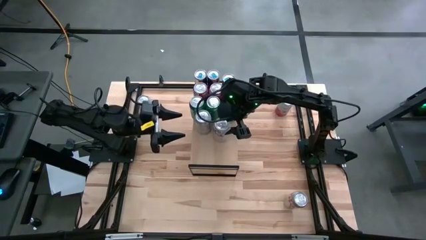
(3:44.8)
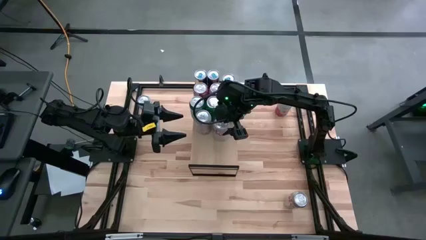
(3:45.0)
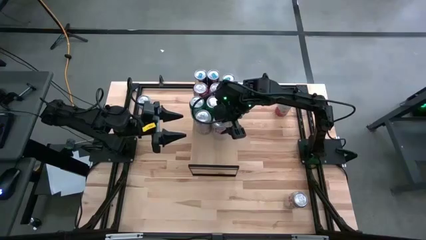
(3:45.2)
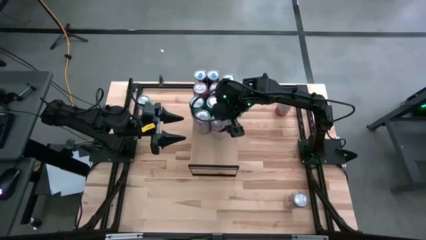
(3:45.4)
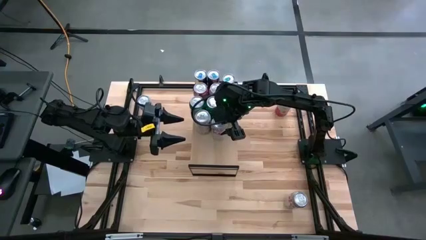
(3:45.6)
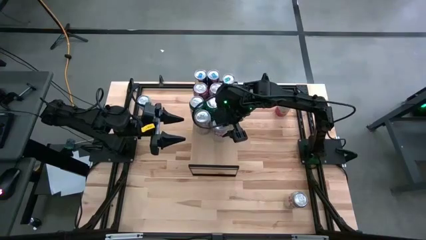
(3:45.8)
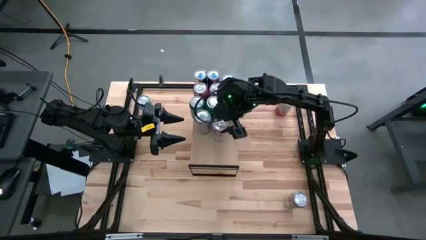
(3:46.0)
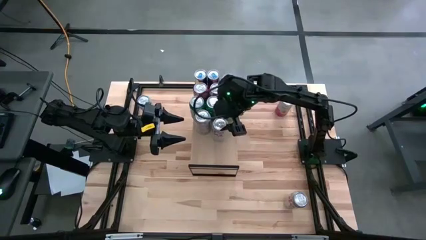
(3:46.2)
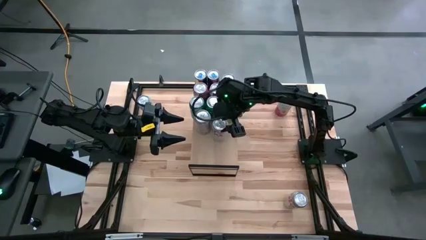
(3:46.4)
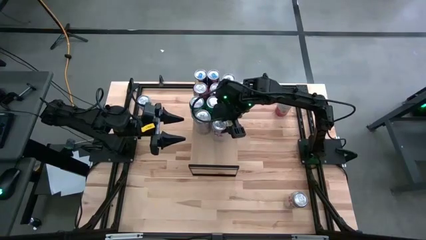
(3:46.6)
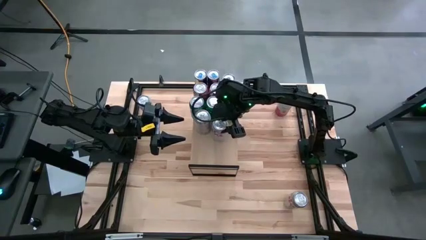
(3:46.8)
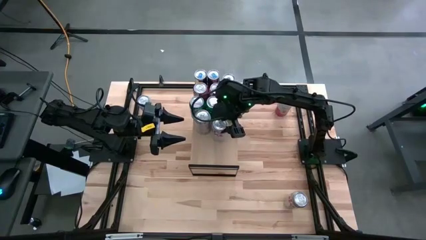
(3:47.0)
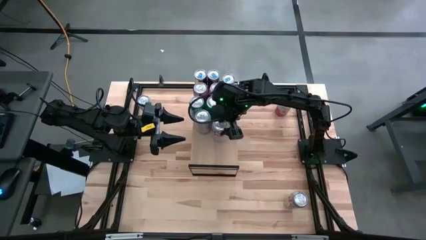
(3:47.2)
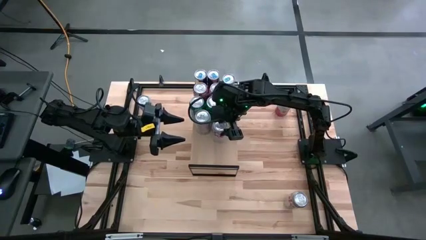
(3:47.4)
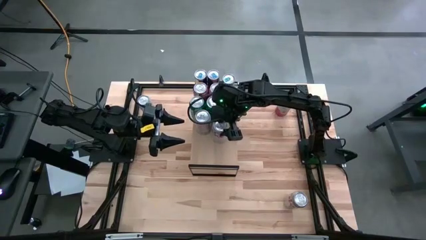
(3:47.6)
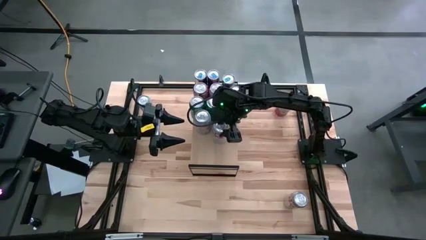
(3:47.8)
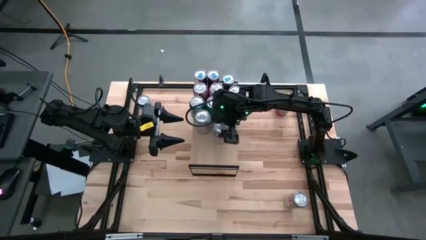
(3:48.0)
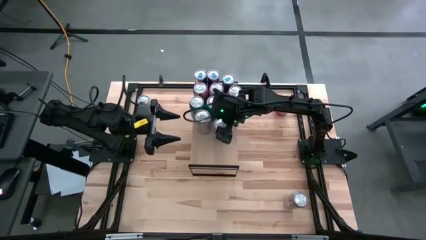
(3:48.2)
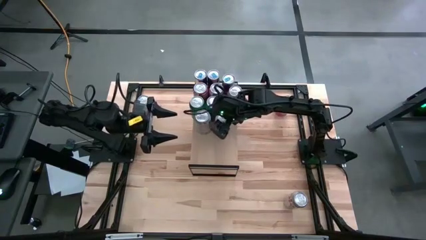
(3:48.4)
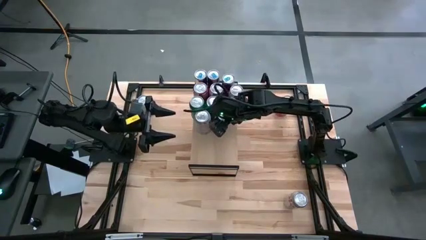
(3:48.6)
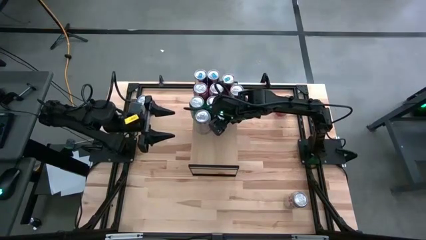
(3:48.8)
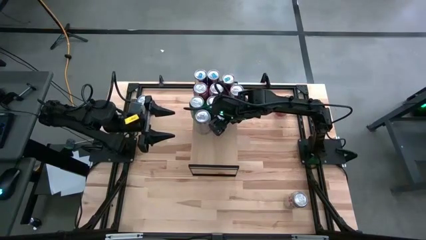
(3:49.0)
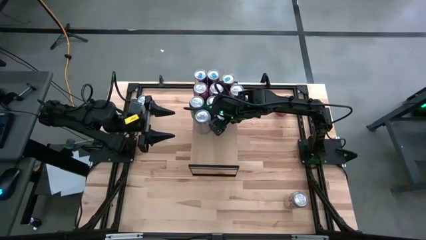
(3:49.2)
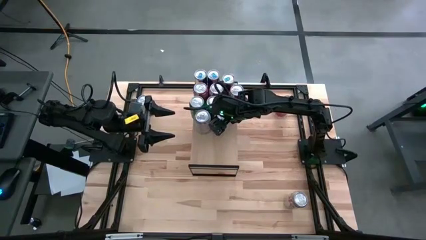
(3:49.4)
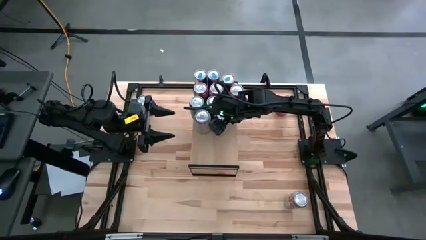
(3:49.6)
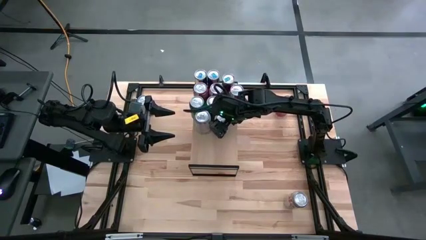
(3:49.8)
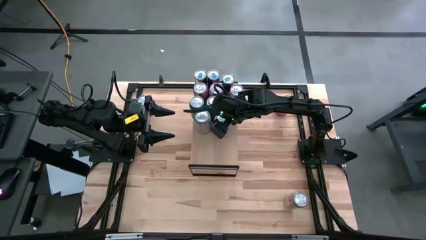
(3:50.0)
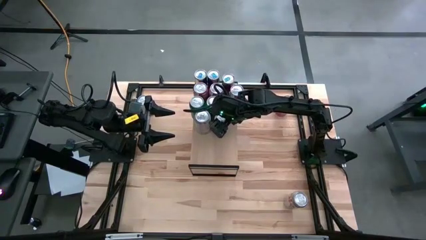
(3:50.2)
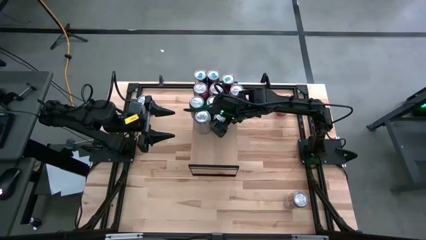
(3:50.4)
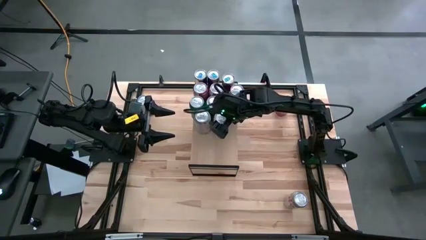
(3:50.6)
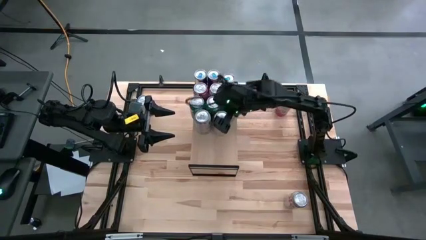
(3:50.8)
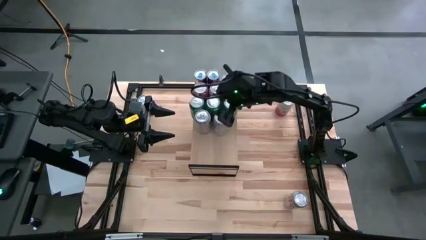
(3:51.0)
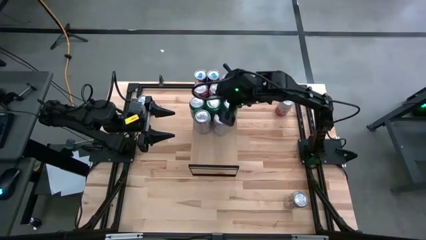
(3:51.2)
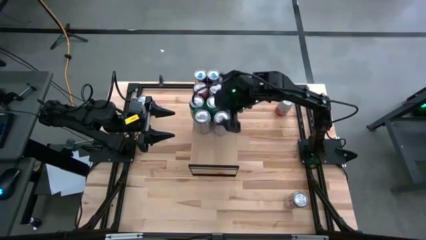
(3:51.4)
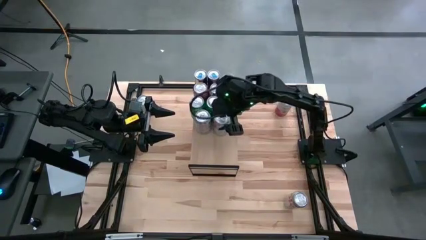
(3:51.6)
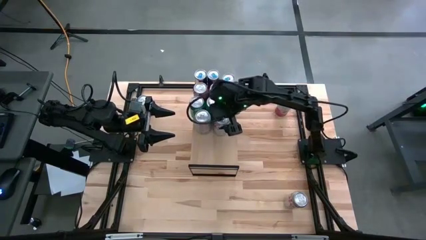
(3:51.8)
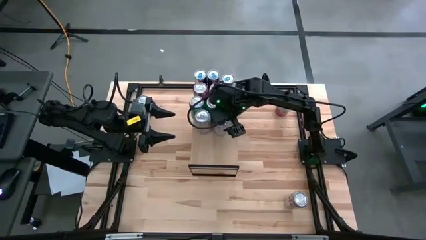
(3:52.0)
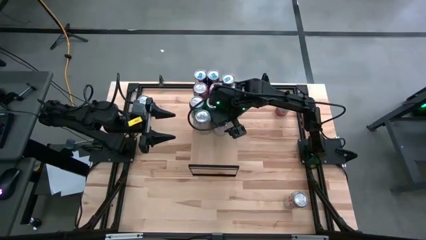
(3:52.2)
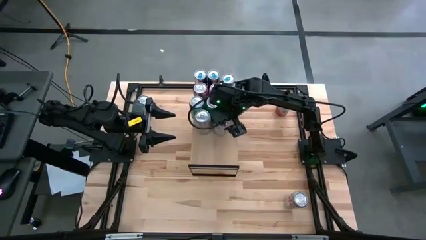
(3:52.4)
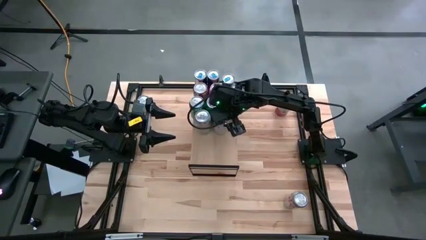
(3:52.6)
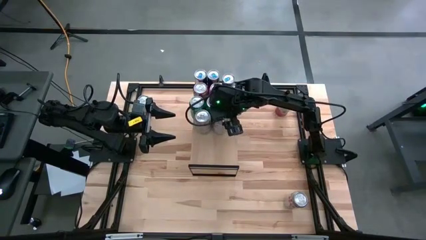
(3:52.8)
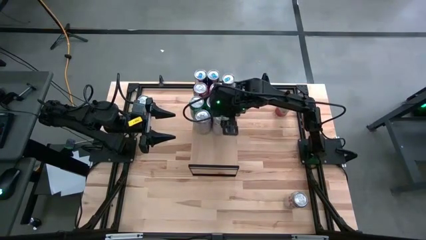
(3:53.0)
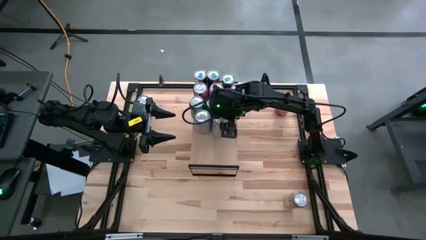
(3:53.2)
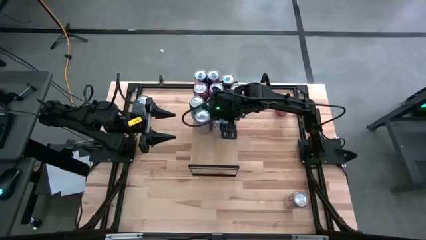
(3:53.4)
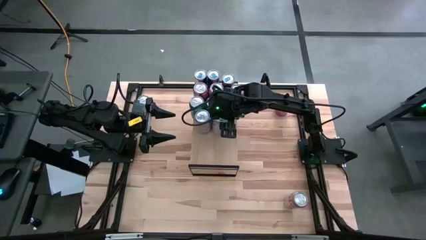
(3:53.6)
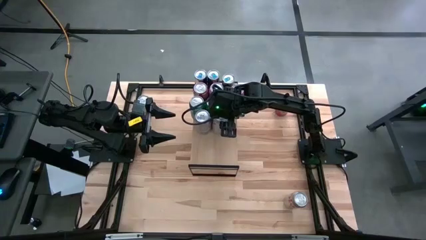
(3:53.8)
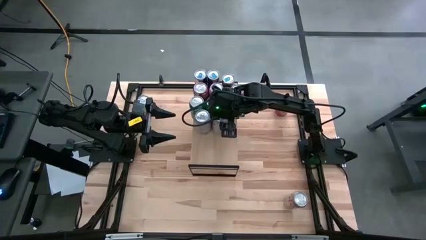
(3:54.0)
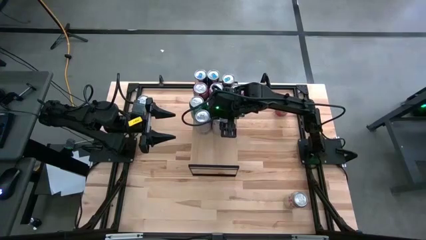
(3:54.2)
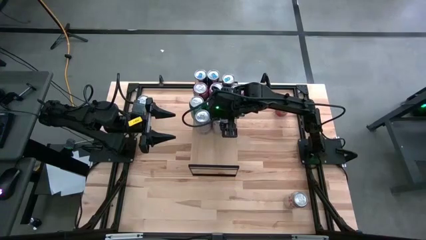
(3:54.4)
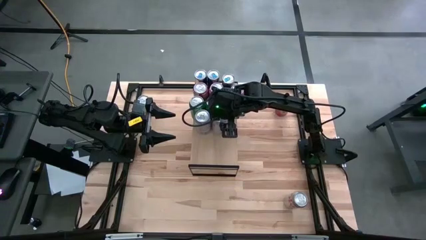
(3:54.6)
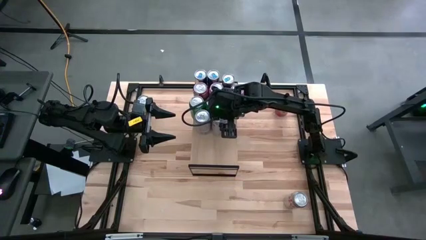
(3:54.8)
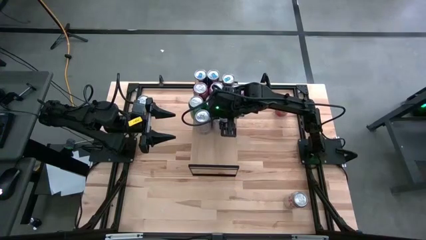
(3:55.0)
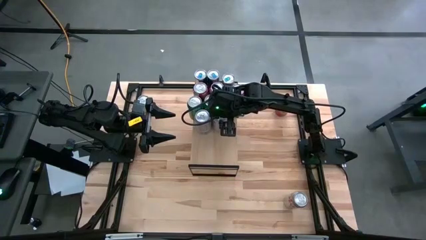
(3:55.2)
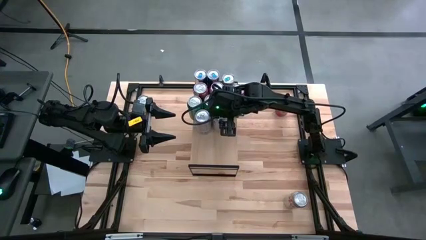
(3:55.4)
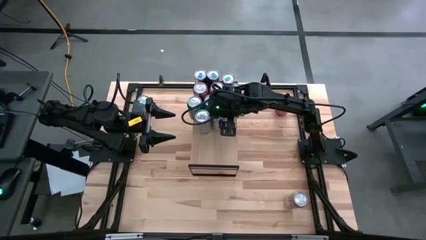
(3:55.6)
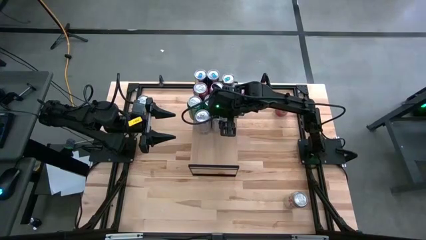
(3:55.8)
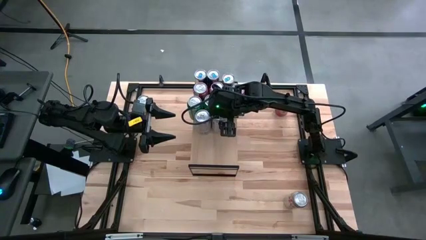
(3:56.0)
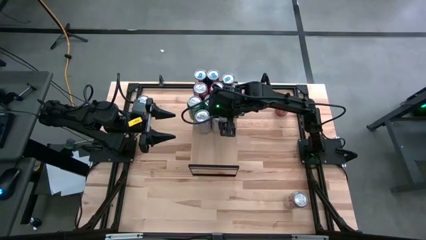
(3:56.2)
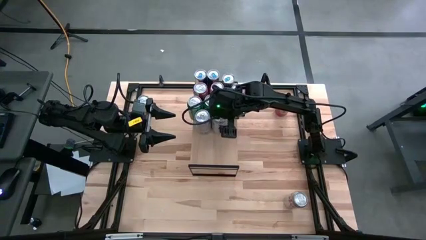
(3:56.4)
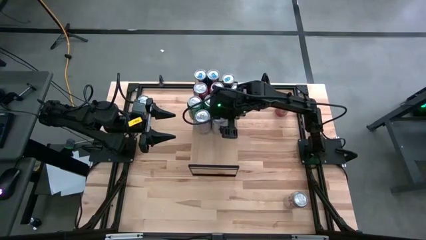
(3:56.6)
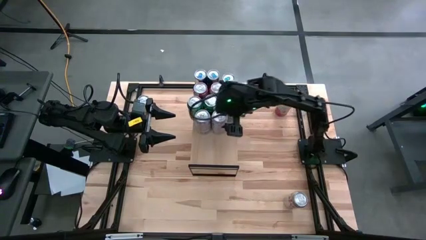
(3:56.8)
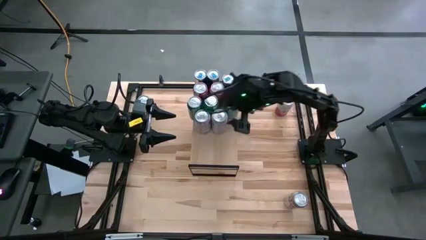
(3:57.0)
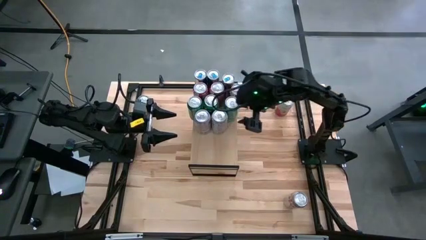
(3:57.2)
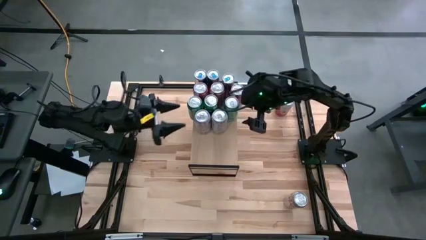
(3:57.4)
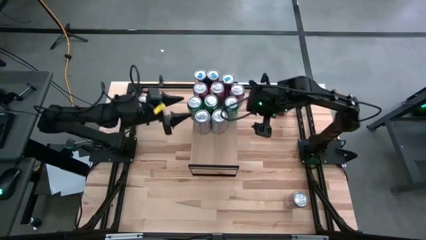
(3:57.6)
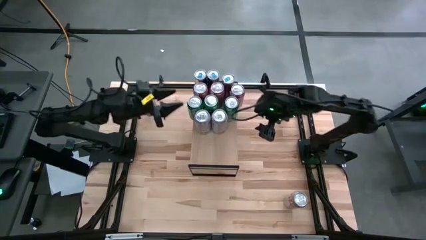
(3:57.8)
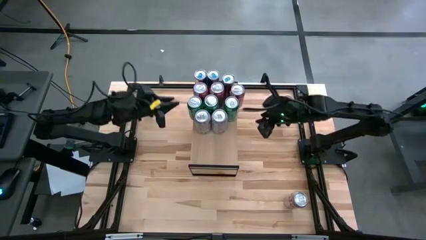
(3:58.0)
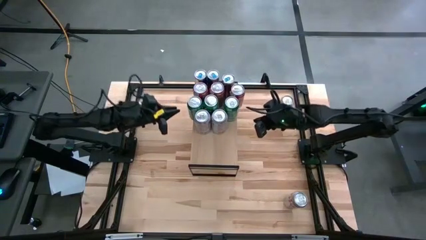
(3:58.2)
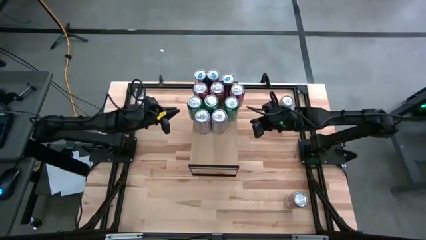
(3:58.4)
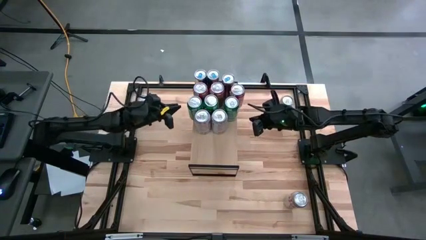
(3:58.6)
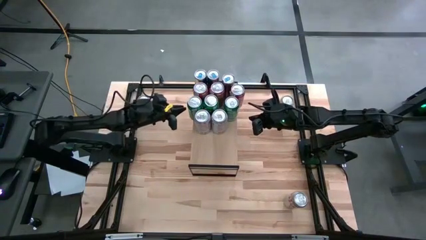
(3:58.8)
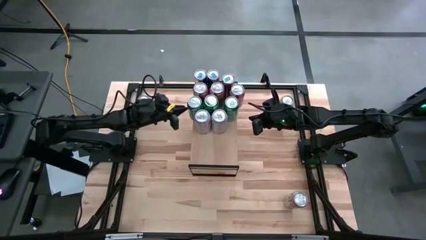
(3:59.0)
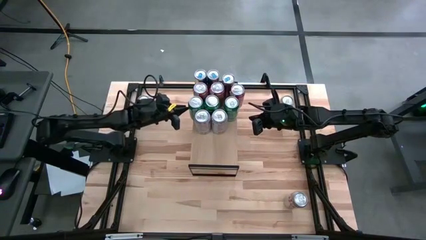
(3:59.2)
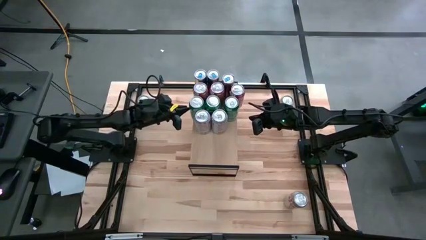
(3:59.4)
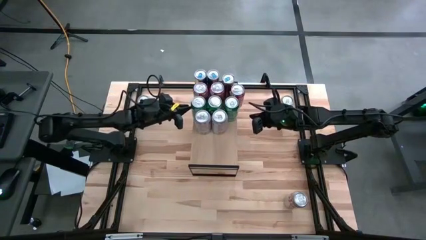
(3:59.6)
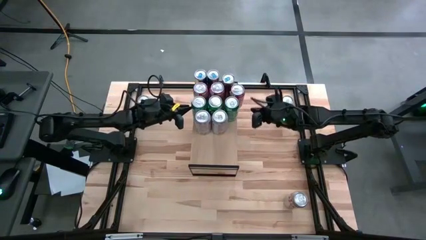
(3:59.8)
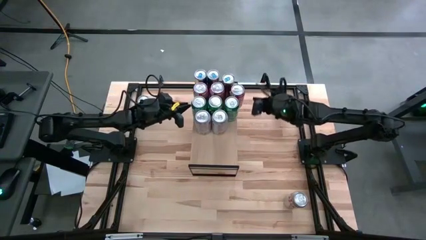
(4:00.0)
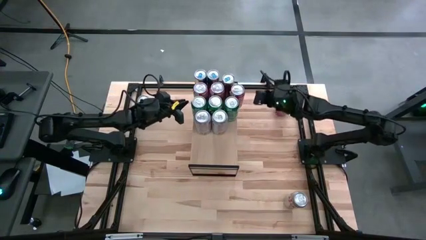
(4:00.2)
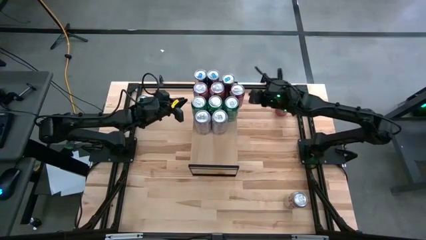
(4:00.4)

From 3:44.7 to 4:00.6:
Task: Place canned beverage on shelf
Put the top red silver soda on the shelf

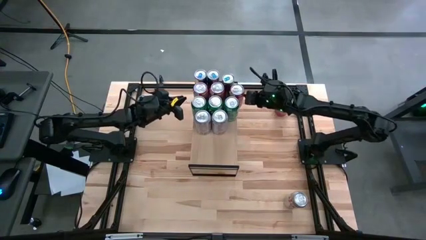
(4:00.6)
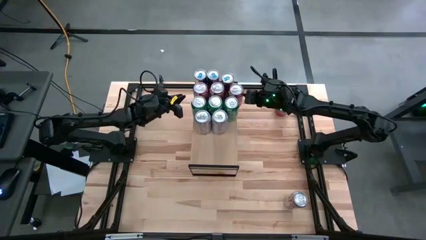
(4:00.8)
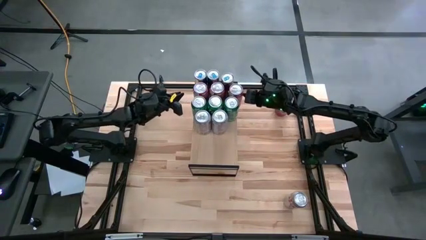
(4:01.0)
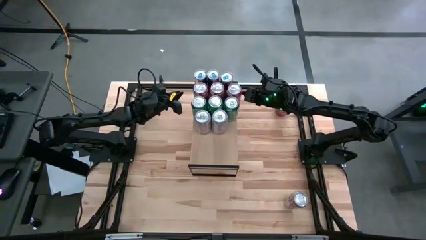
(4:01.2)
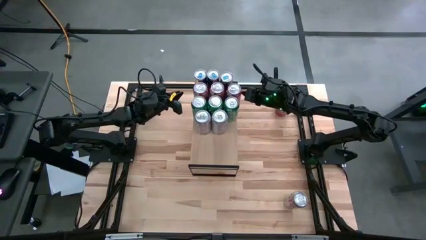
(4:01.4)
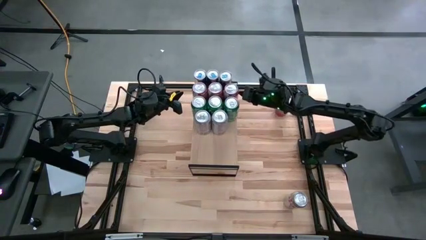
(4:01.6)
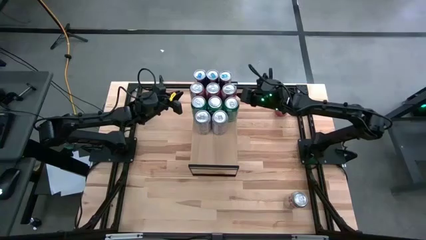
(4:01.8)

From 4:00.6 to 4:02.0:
Adjust soda cans on the shelf
